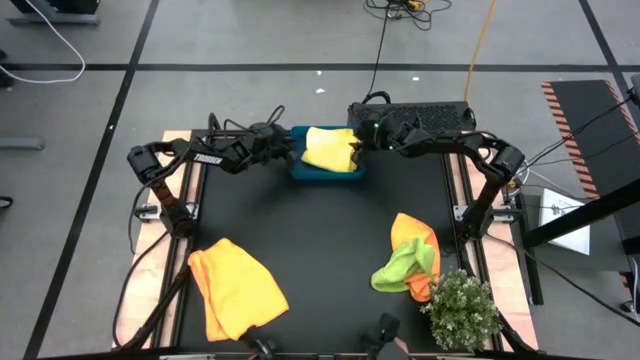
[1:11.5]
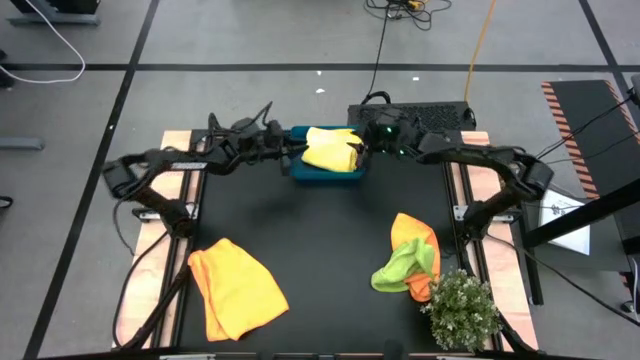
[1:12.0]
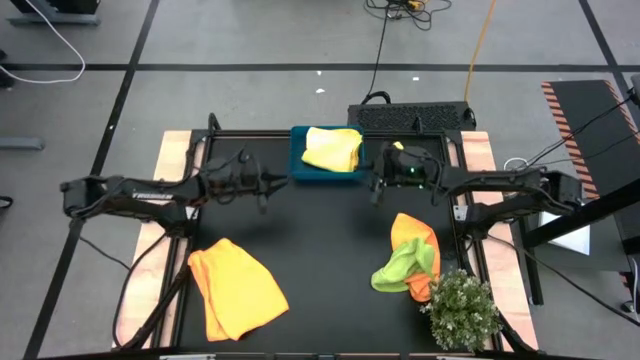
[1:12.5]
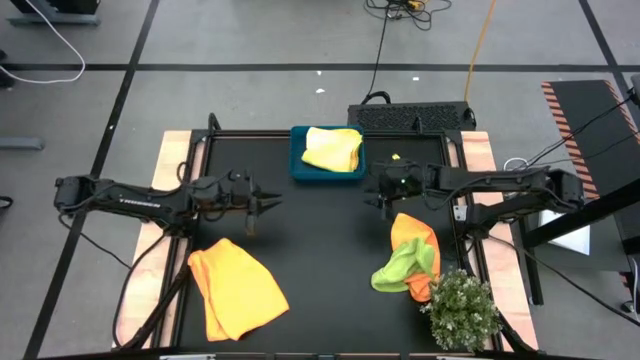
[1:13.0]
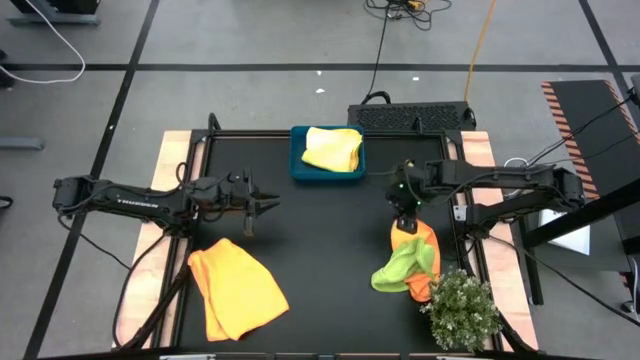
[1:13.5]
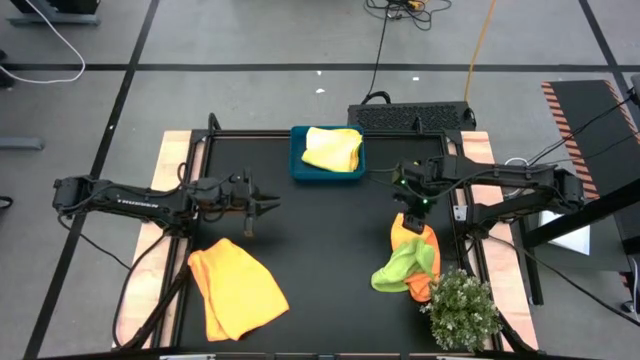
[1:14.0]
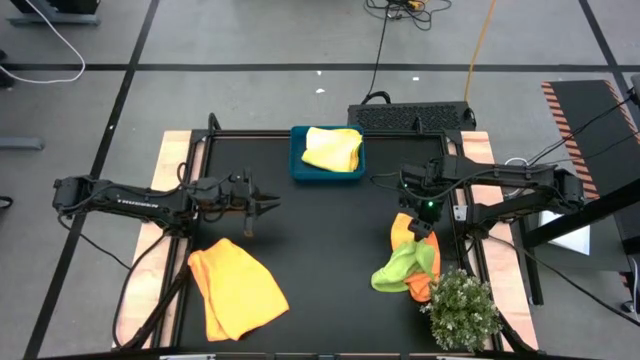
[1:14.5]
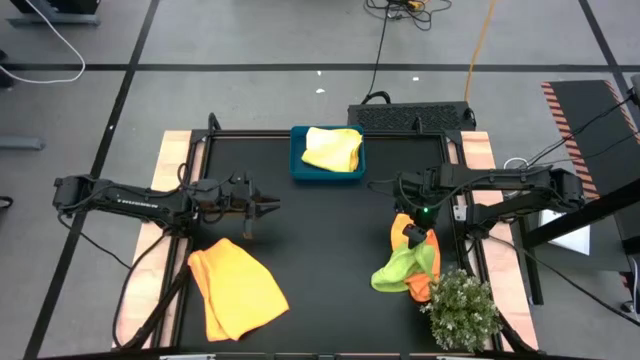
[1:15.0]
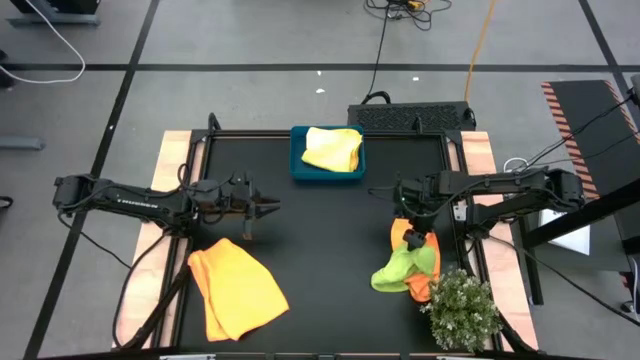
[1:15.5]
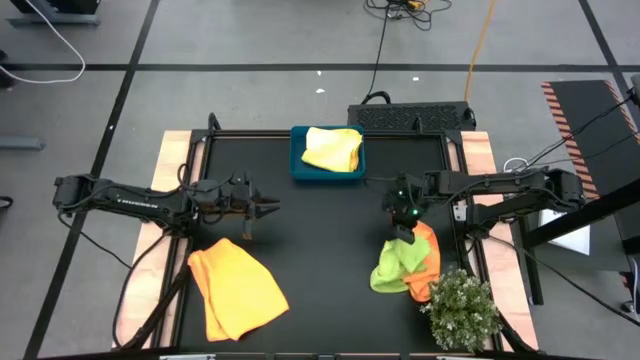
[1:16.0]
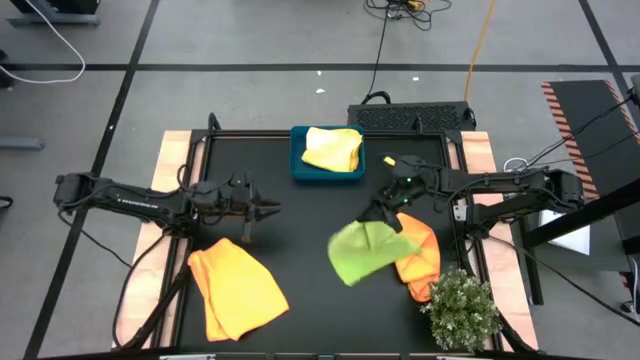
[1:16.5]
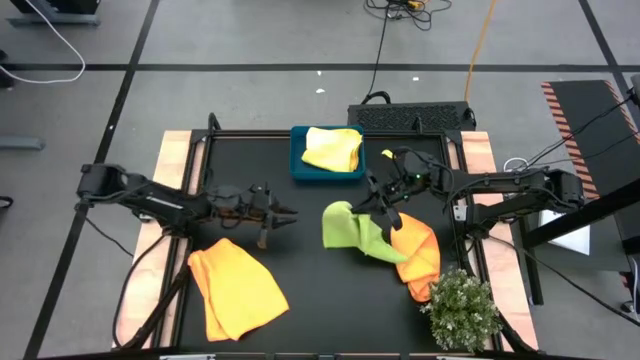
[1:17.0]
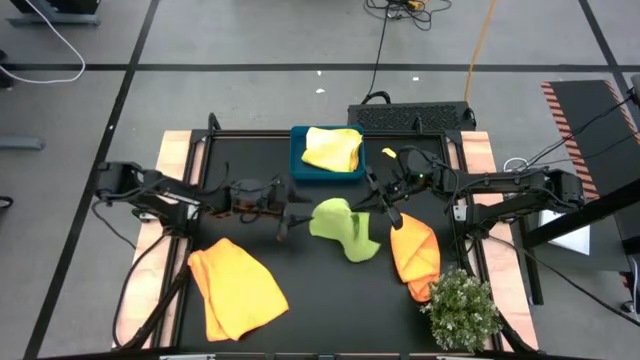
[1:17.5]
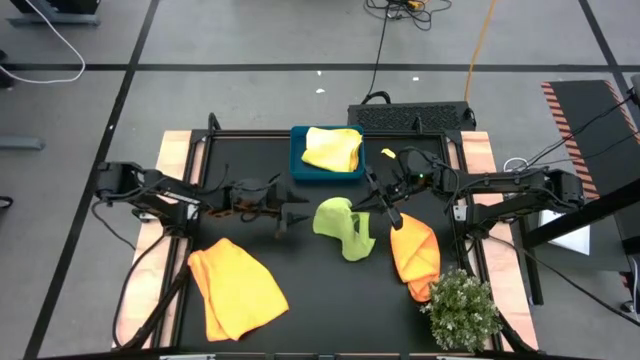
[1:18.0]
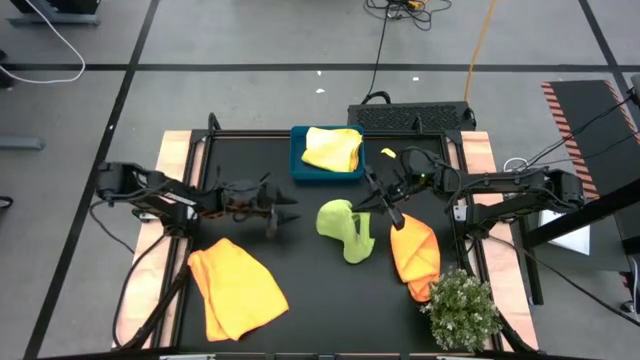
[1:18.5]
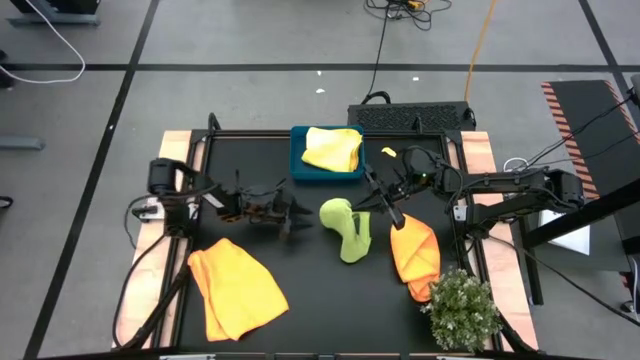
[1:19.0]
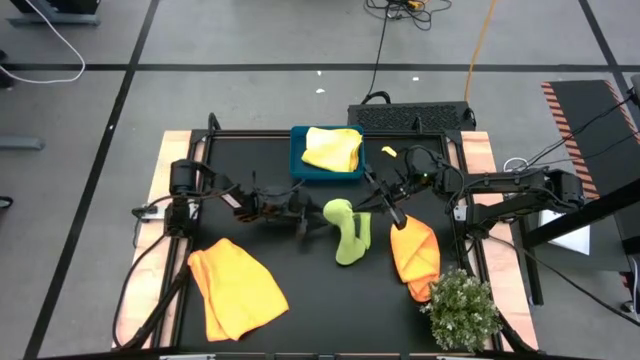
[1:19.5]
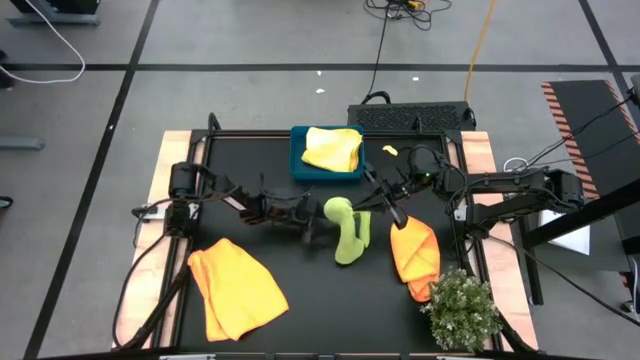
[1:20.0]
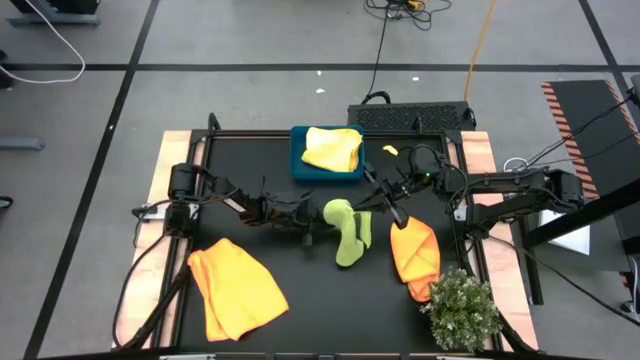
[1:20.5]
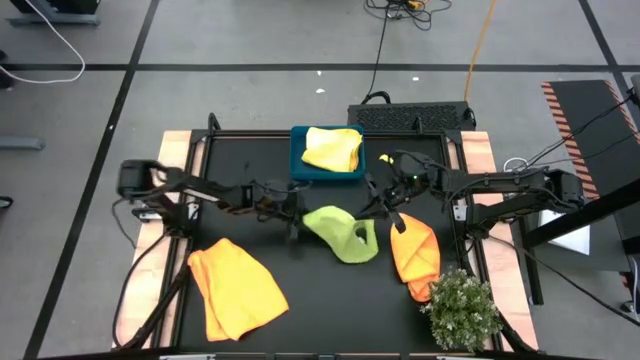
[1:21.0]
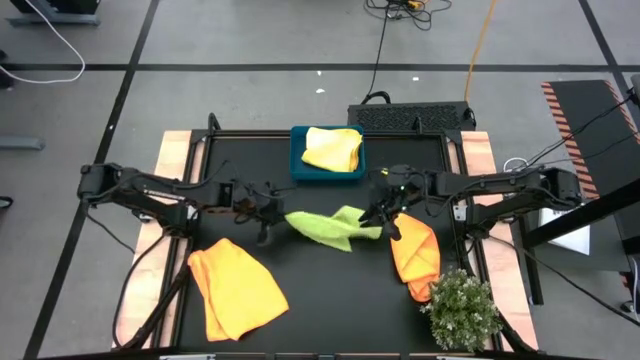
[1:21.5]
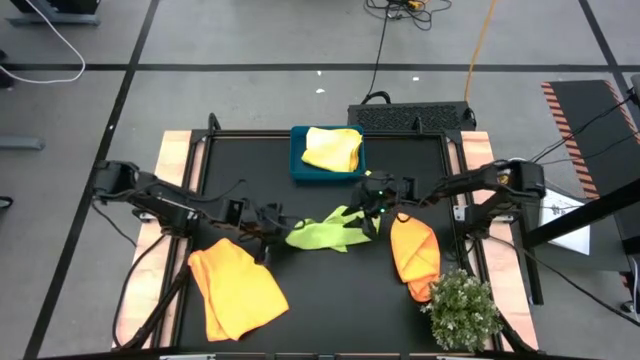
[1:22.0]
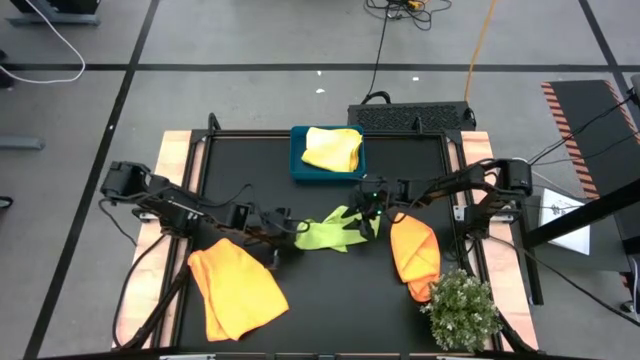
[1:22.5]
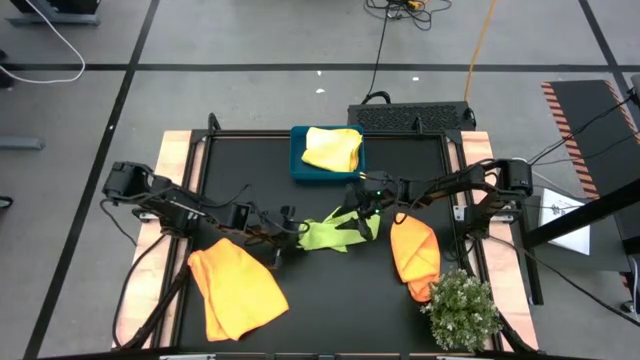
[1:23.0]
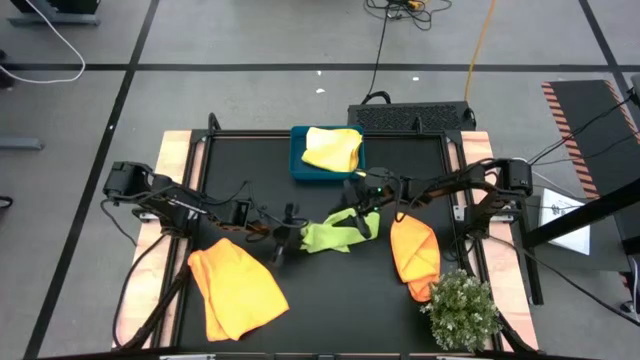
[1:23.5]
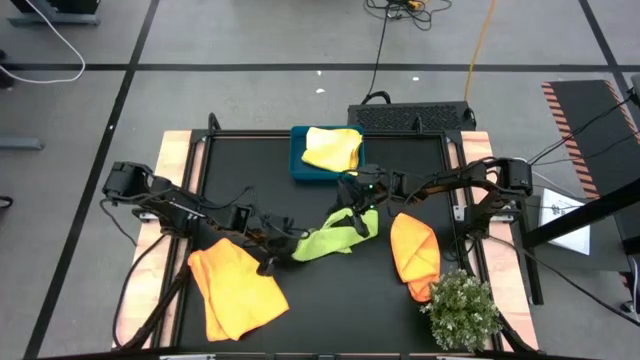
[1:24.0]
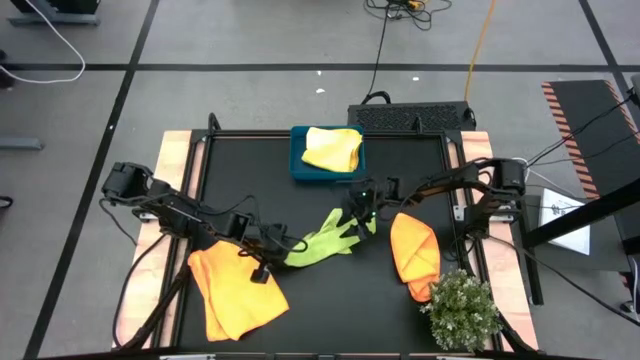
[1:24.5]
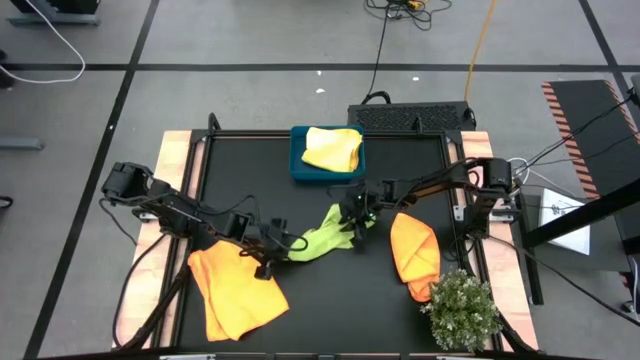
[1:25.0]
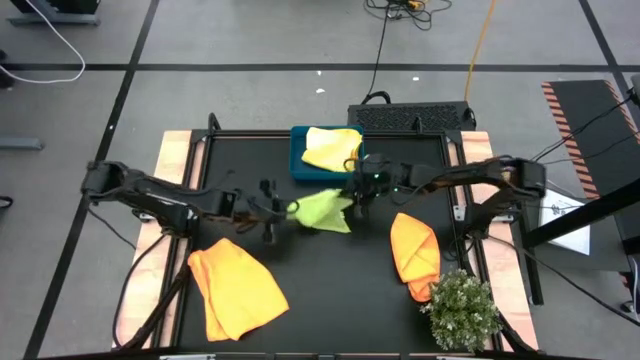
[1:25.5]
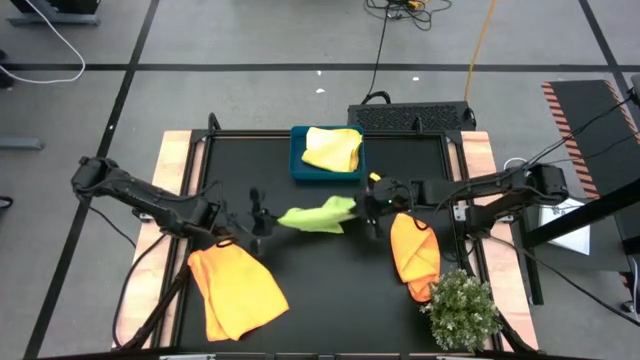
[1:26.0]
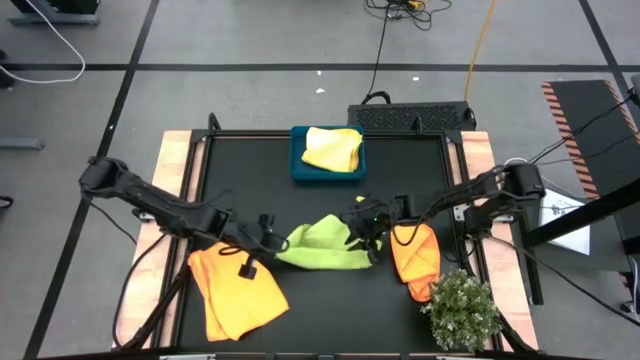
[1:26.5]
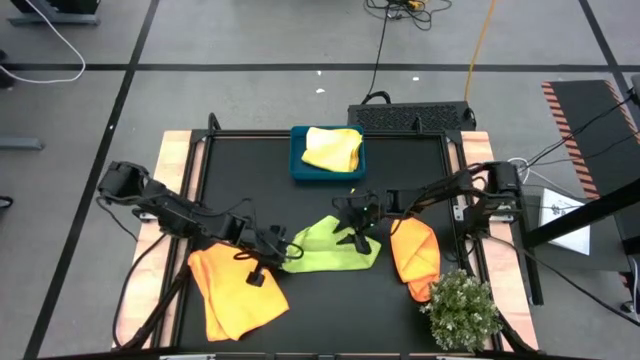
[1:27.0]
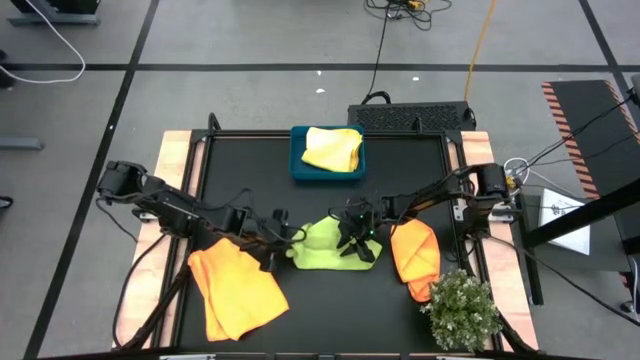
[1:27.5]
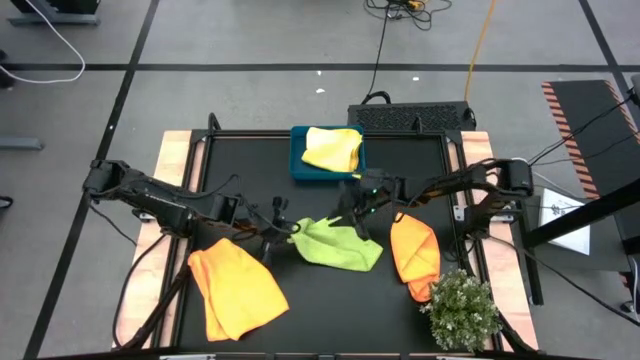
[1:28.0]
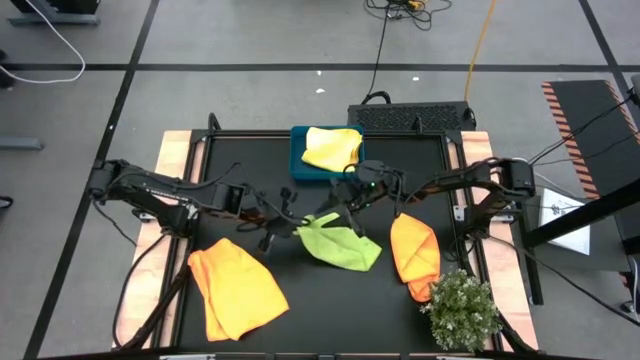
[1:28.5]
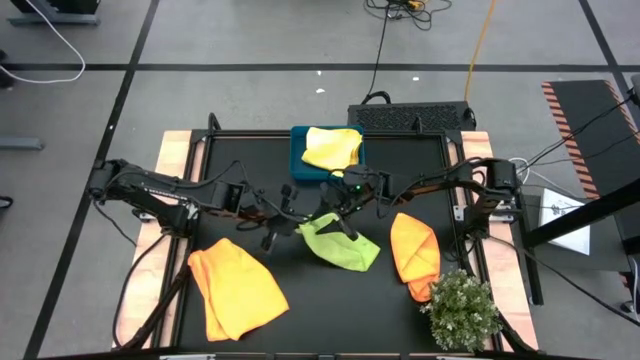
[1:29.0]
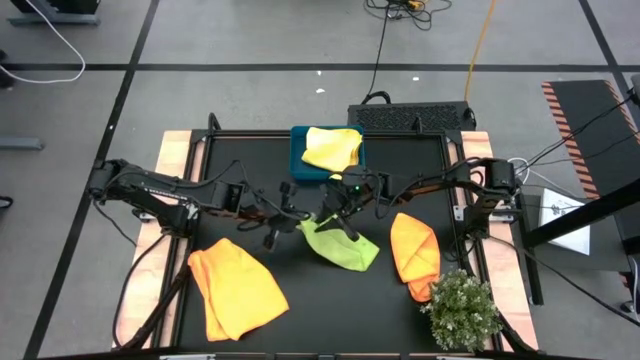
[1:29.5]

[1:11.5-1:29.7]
Task: Fold microfiber towels
Fold the green microfiber towel

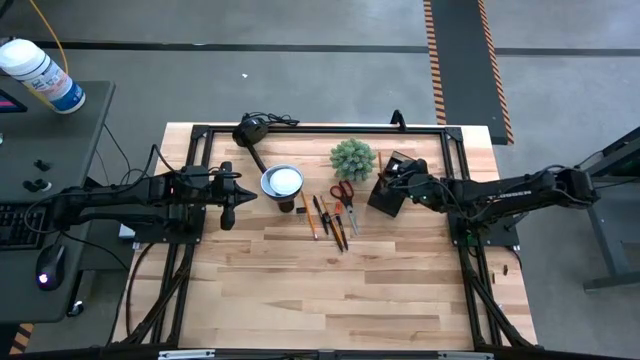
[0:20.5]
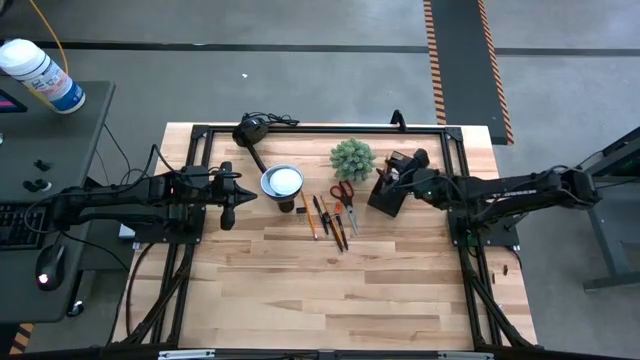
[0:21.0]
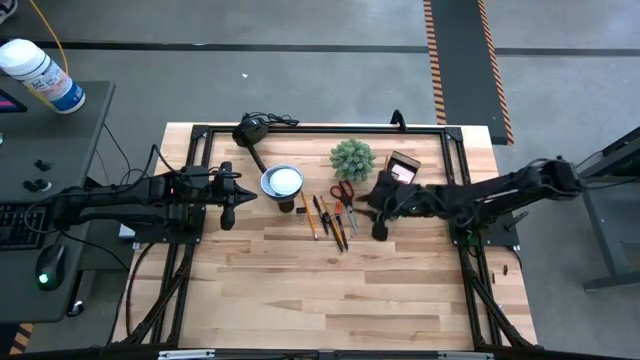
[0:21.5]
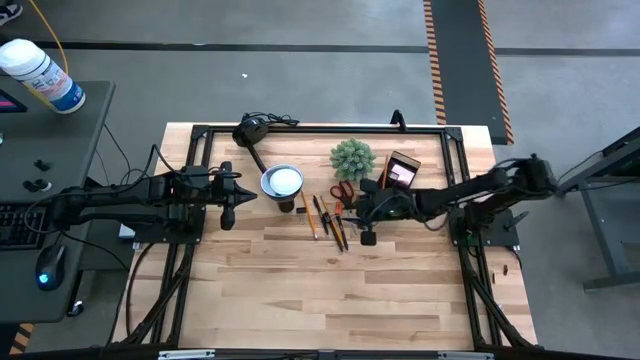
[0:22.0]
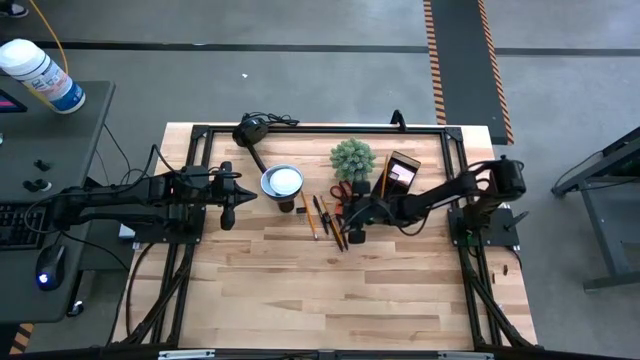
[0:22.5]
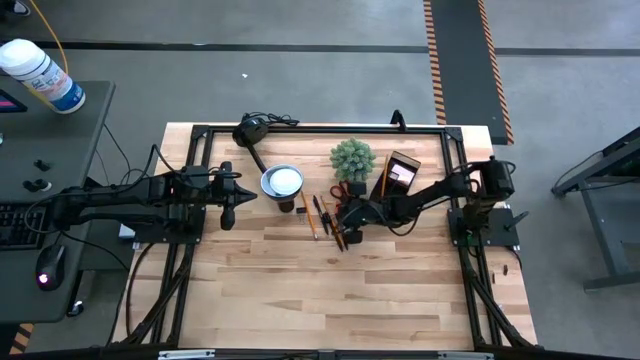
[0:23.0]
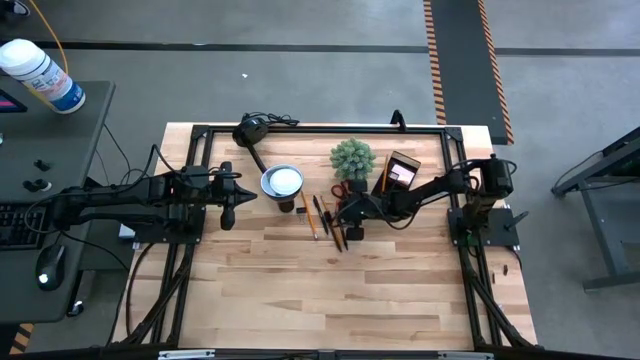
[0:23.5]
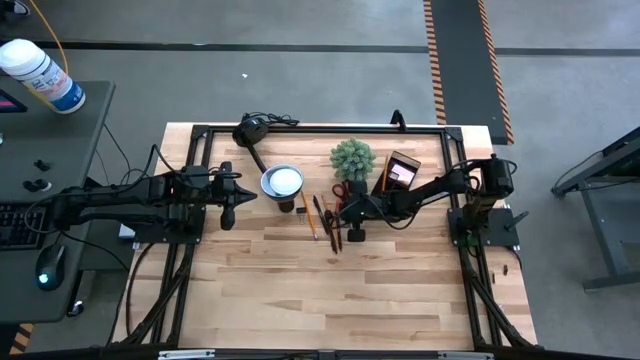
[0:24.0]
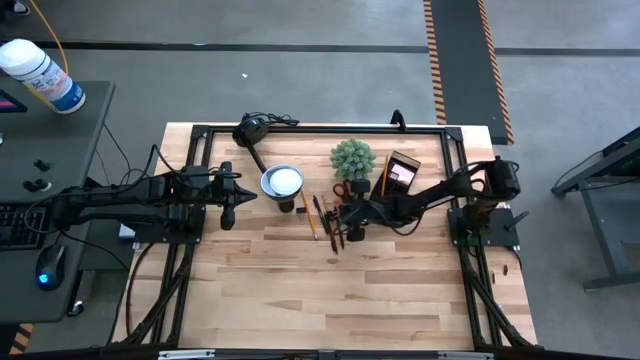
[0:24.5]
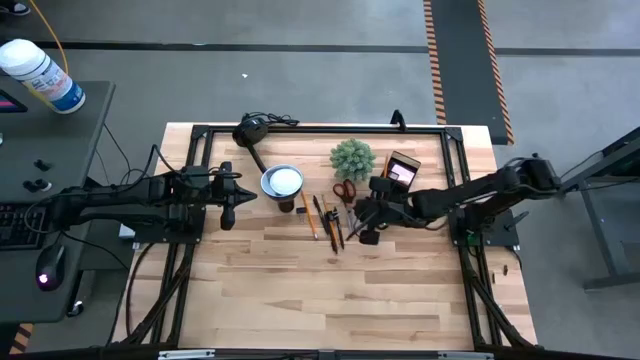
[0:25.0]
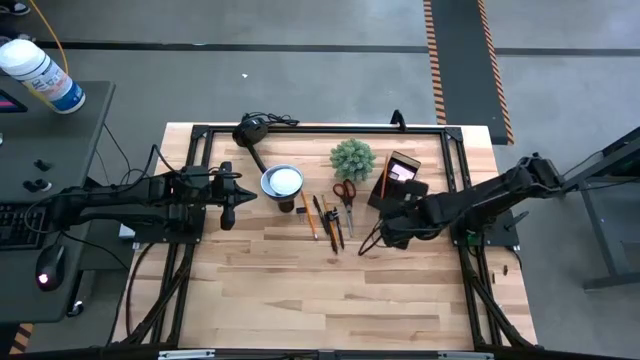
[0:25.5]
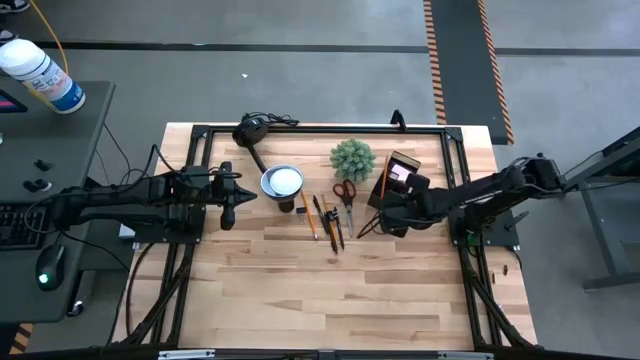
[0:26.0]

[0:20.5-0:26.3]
Task: Pick and place office supplies into organizer
Put the orange eraser into the desk organizer
